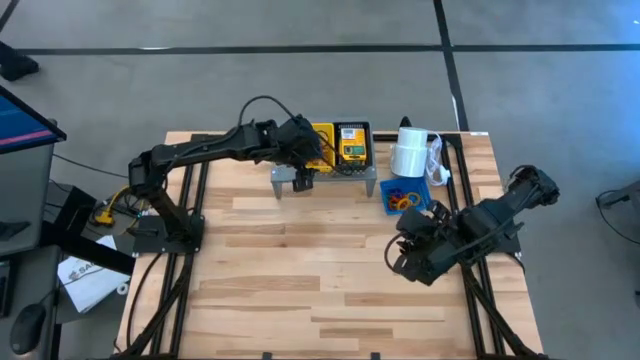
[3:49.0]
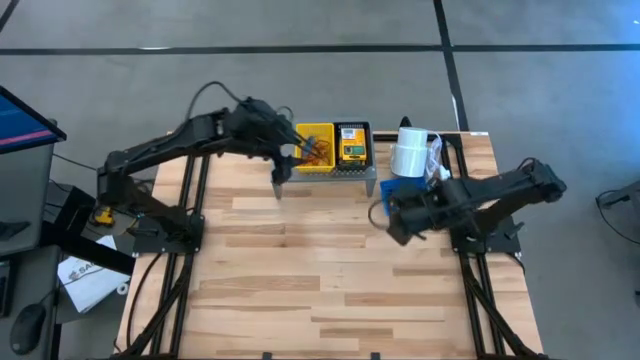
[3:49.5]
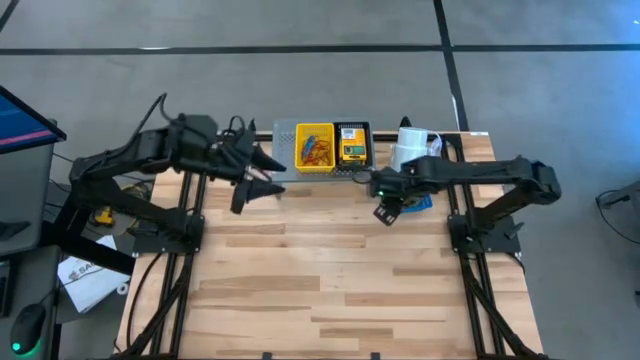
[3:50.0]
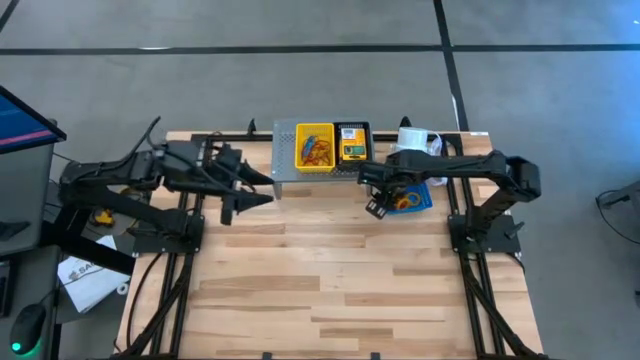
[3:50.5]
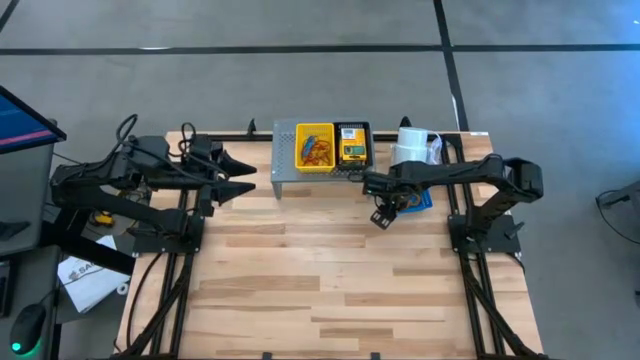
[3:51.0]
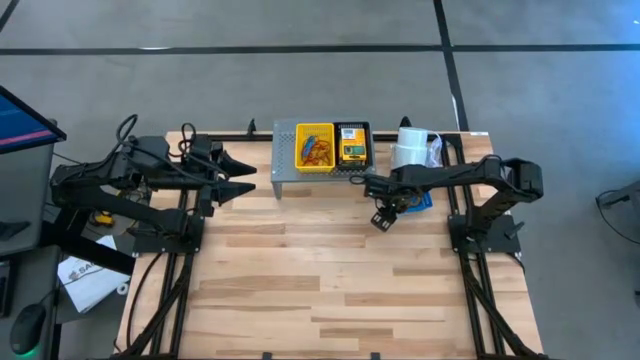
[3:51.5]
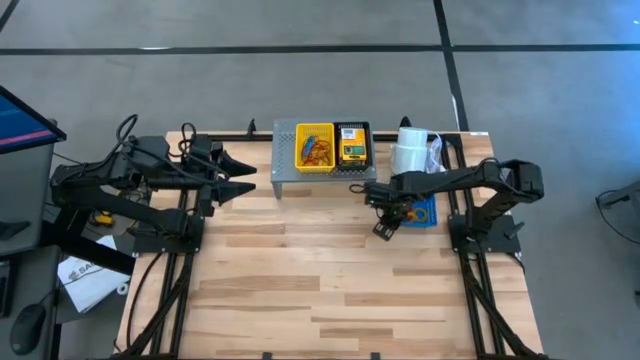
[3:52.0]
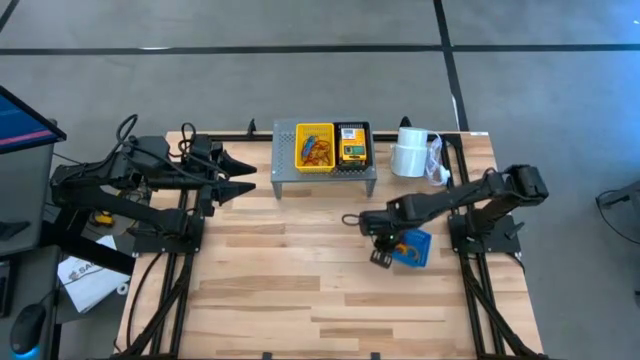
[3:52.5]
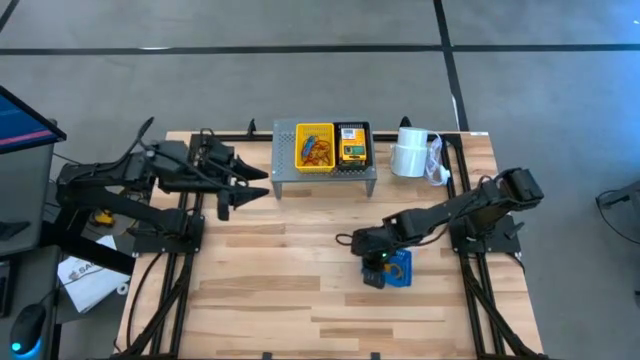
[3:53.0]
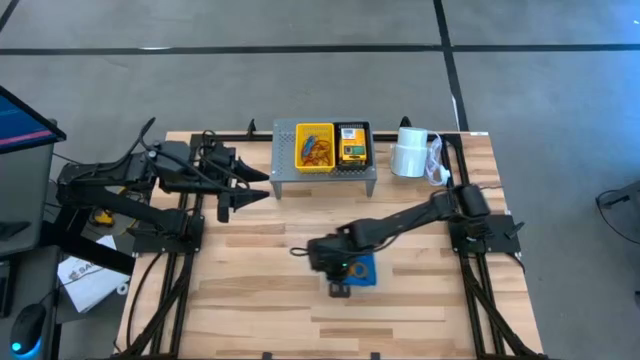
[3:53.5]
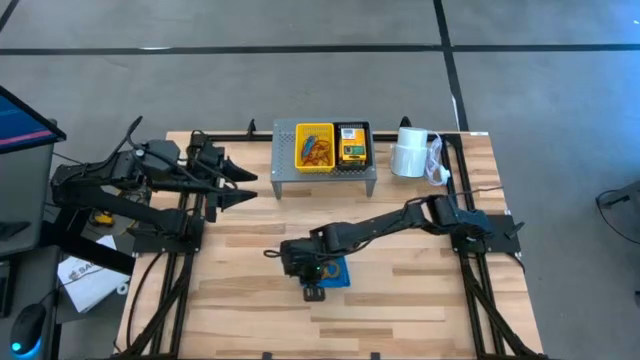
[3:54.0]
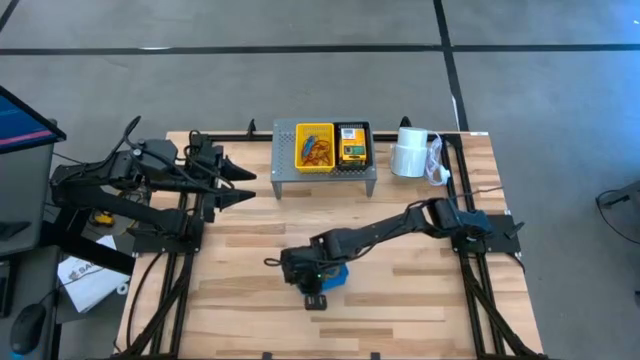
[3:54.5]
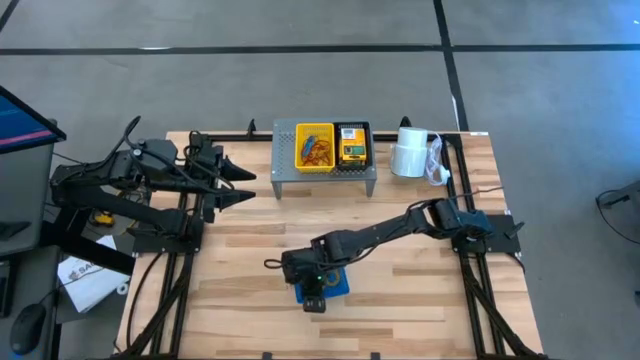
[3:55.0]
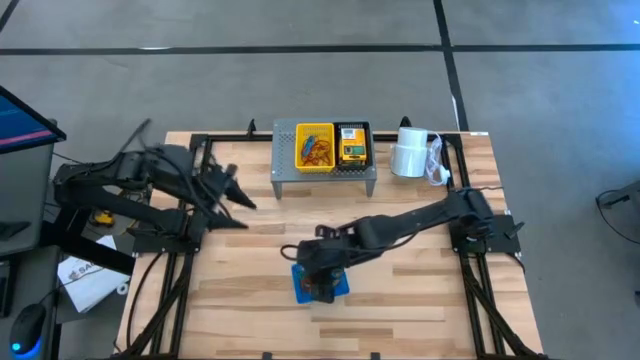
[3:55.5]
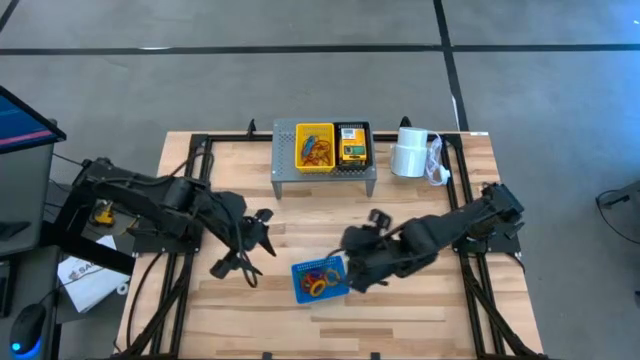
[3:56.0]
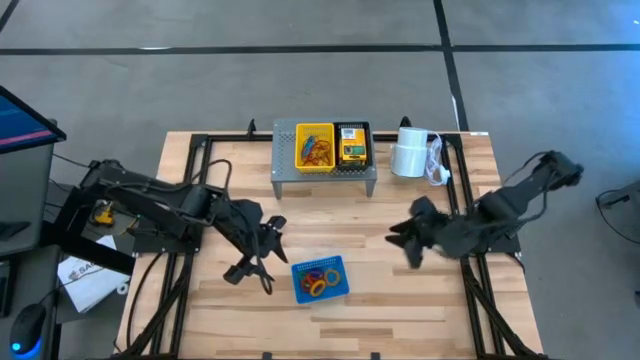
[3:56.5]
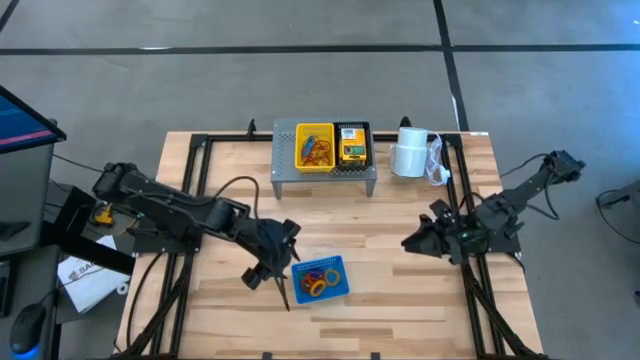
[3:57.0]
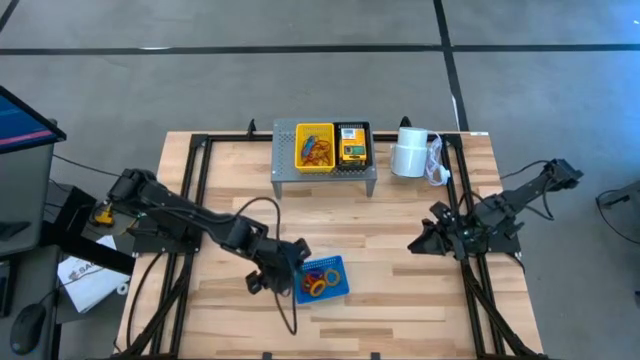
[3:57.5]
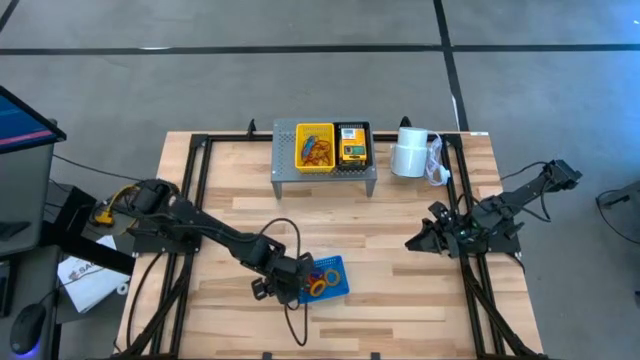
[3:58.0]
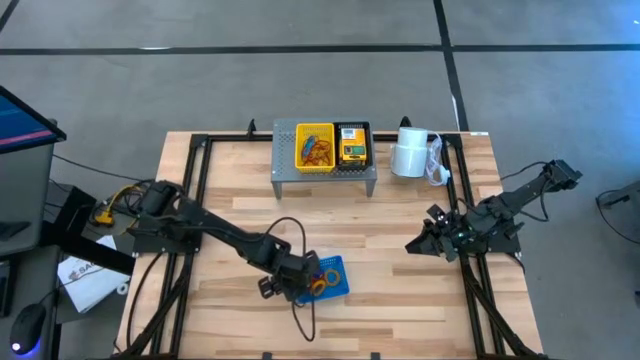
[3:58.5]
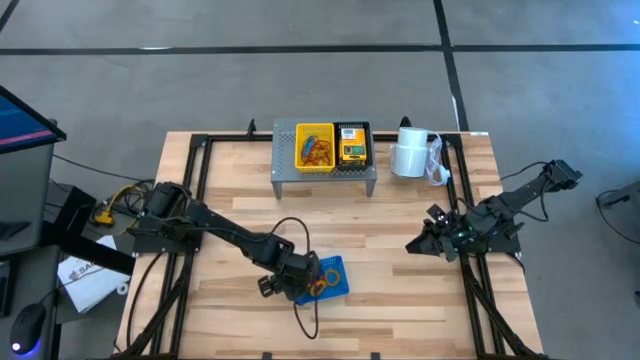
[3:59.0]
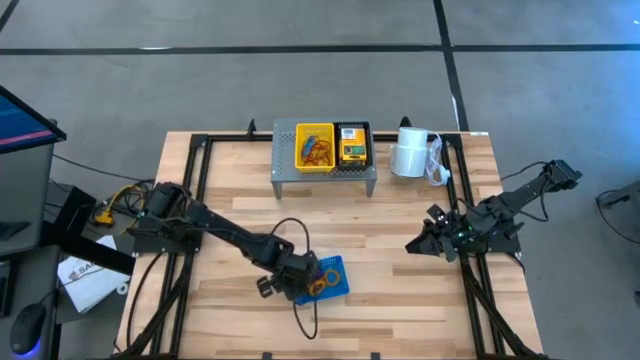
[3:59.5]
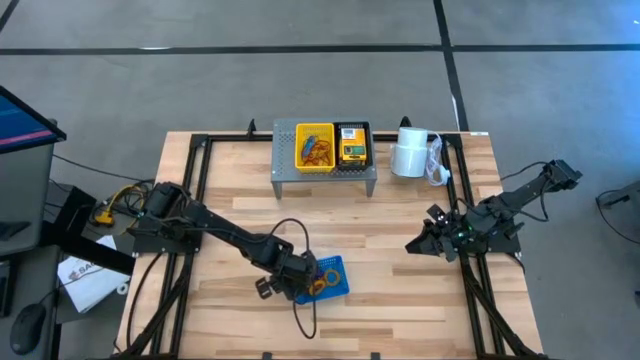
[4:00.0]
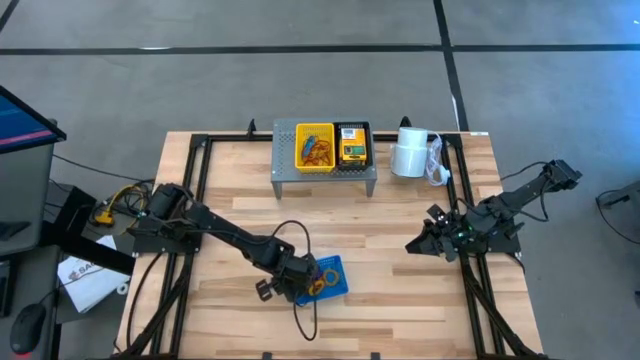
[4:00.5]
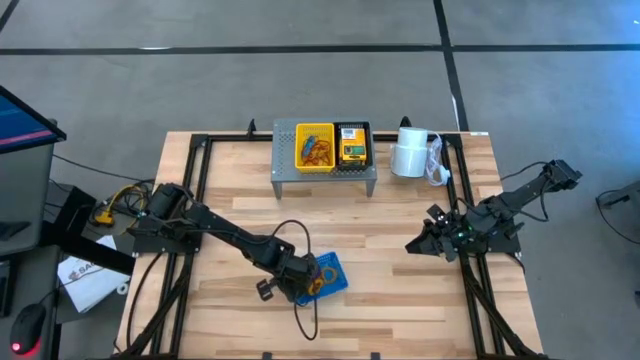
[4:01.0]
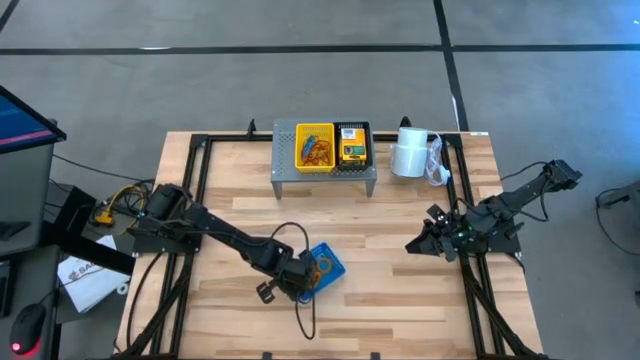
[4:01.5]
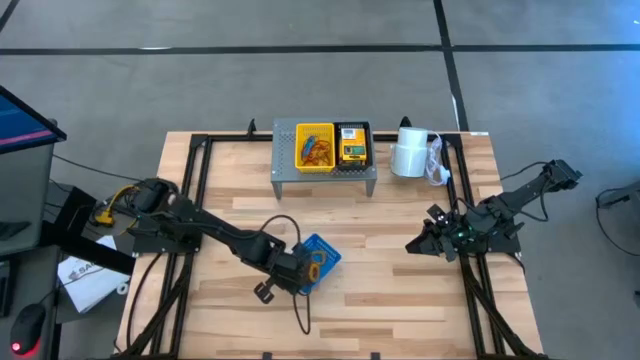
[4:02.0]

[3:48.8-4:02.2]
Task: Pick & Place Office Desk Supplies
Put the blue basket on the shelf

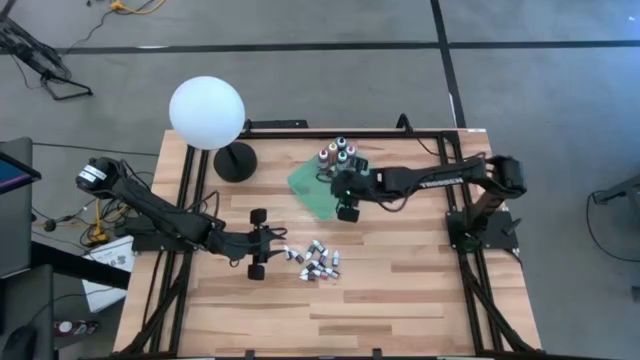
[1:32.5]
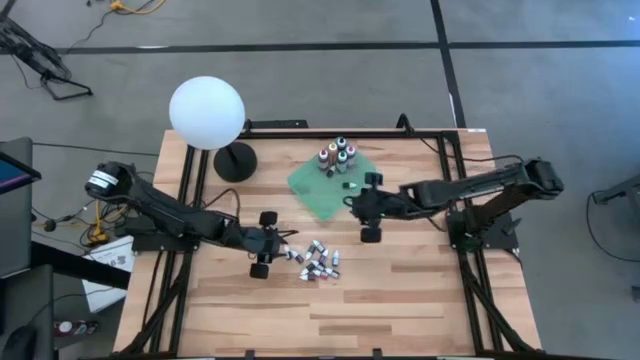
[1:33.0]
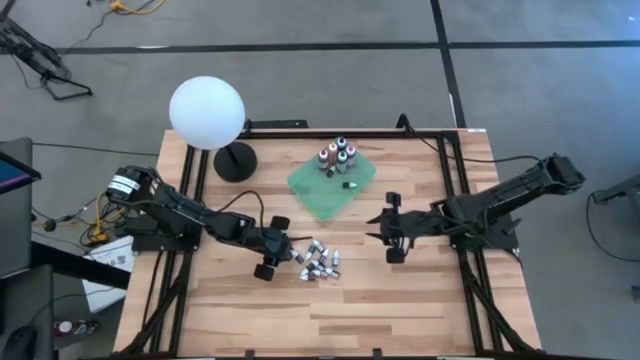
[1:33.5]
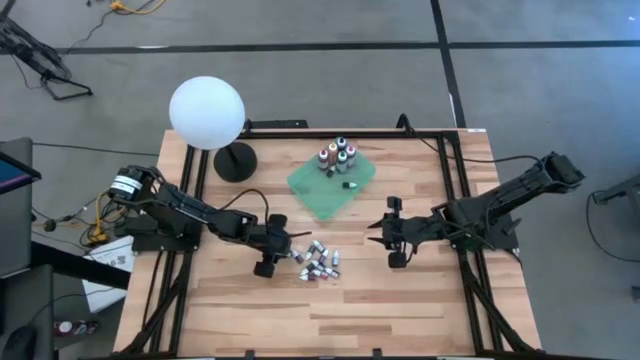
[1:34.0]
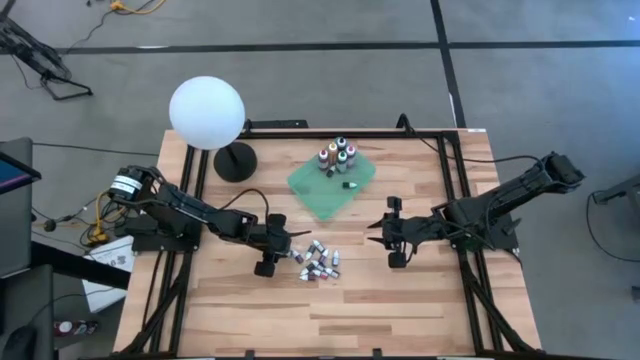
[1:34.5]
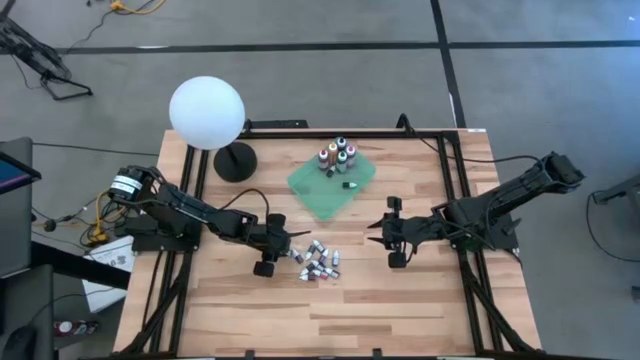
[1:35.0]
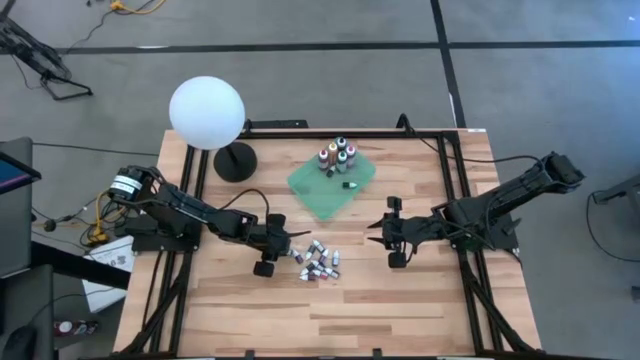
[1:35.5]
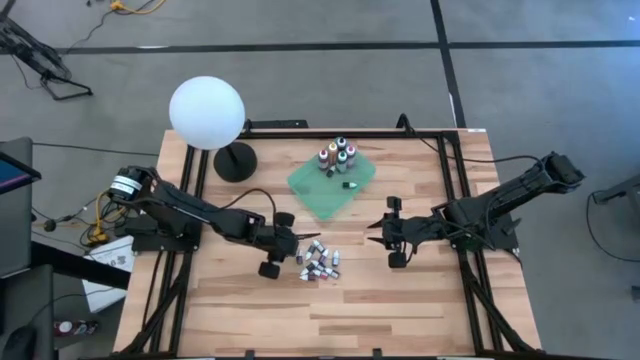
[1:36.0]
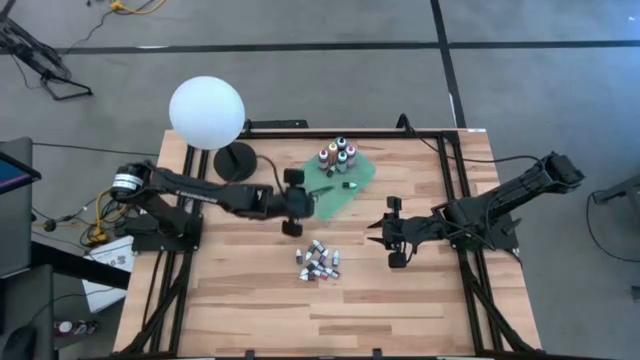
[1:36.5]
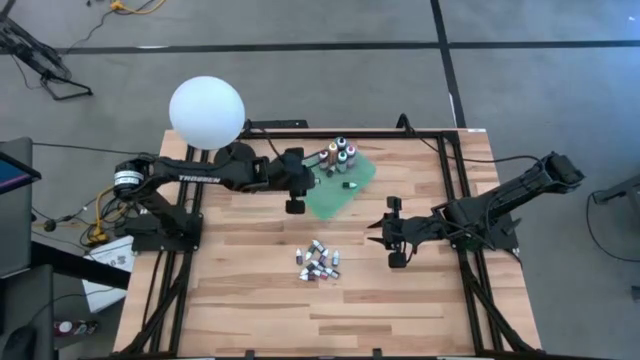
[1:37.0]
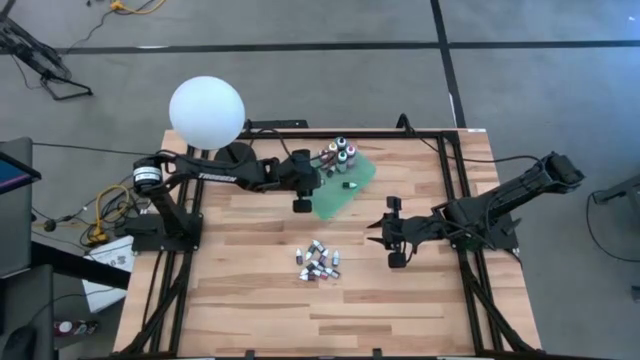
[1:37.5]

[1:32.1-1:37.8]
Task: Pick & Place food coloring
Put the left green food coloring bottle into the green bin
